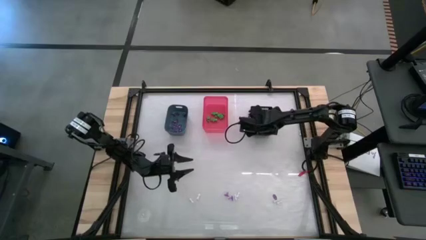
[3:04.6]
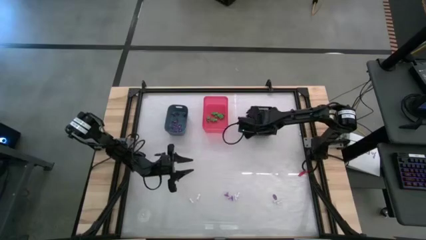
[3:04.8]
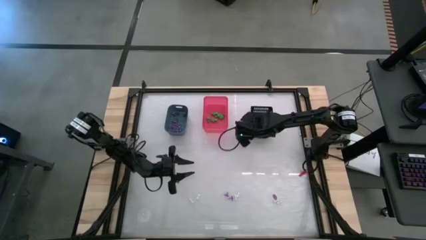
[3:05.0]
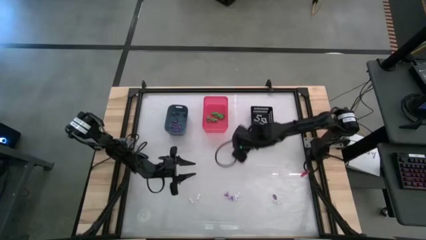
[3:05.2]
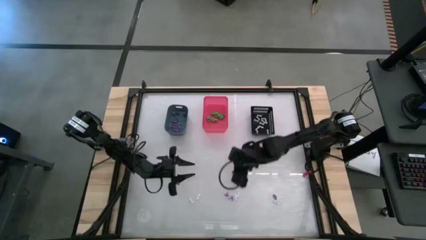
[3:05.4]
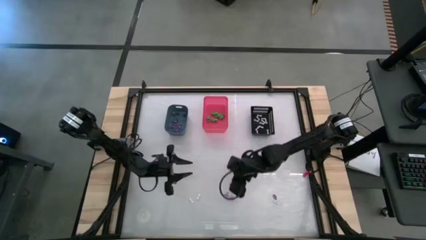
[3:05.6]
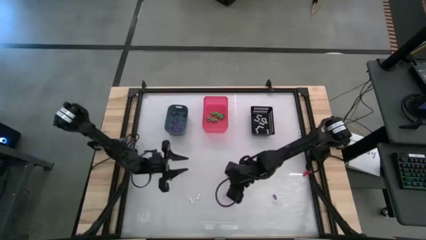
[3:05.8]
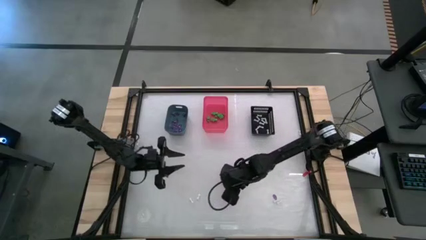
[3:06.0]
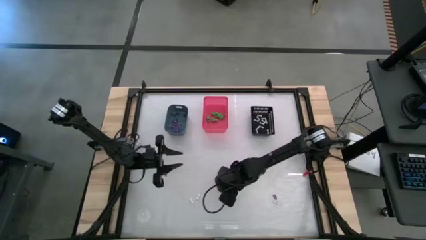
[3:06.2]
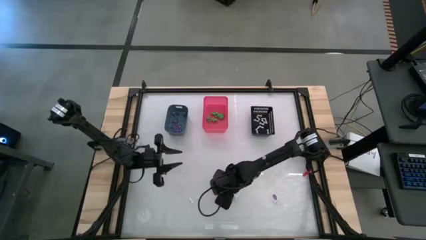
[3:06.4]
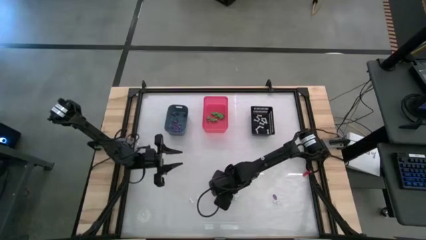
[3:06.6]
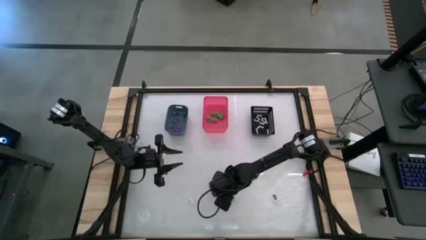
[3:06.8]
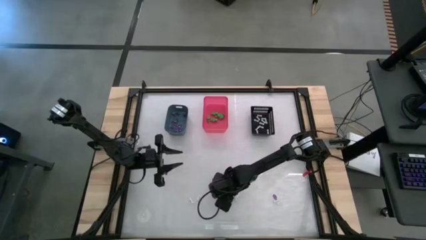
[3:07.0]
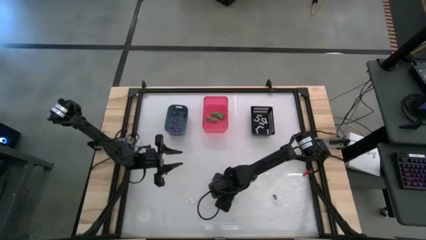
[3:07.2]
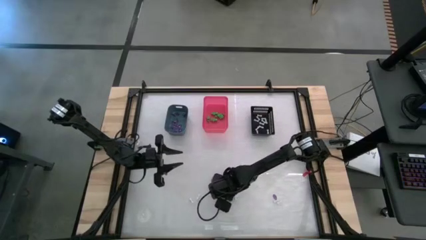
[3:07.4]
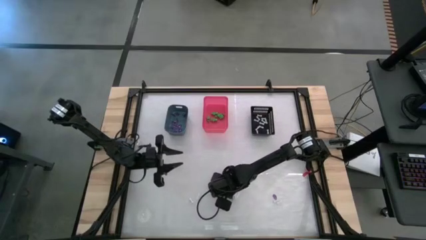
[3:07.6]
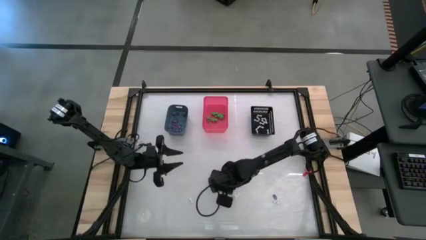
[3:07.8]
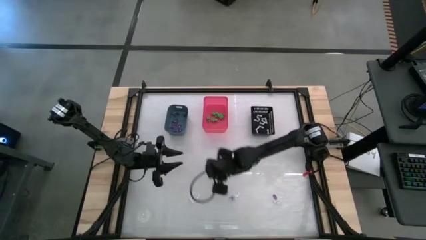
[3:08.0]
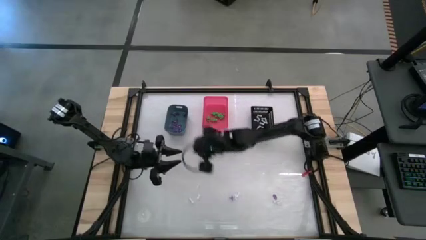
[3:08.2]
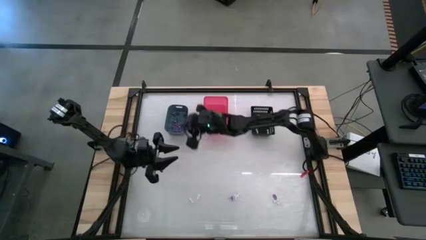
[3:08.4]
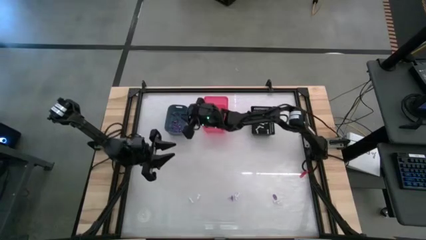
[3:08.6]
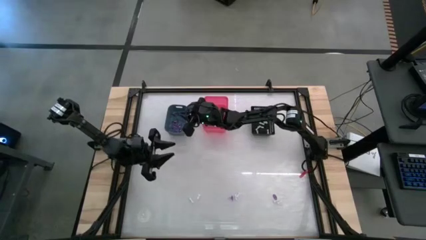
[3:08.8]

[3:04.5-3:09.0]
Task: Sort Halloween decoration
Put the purple witch hat toy into the blue bin

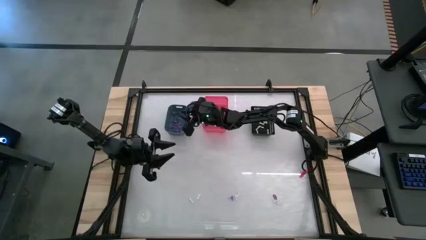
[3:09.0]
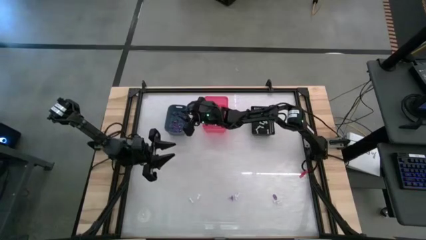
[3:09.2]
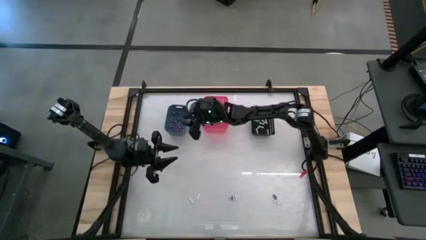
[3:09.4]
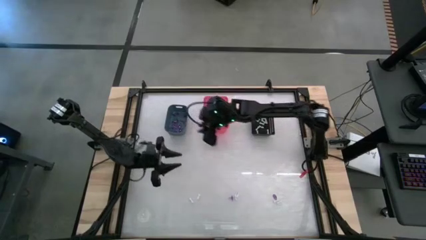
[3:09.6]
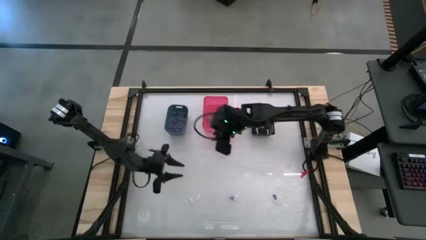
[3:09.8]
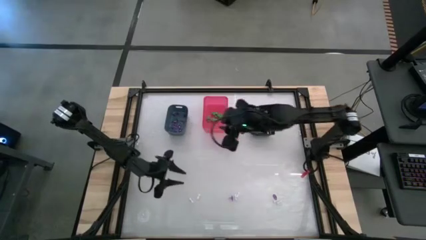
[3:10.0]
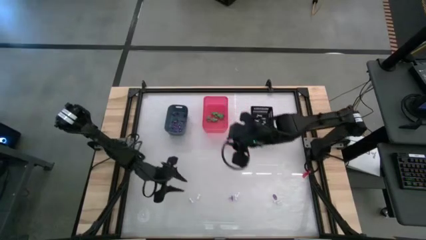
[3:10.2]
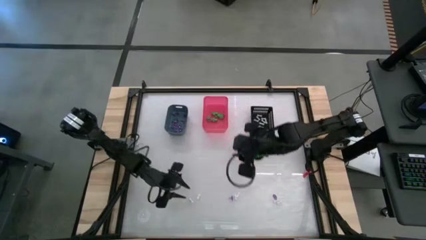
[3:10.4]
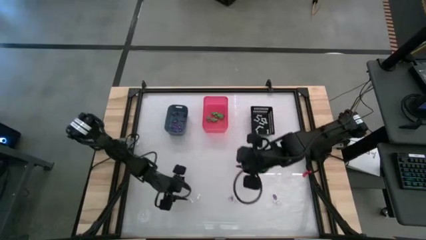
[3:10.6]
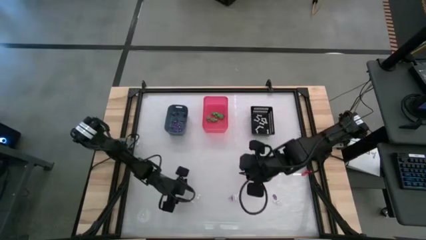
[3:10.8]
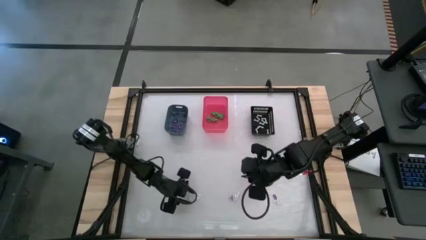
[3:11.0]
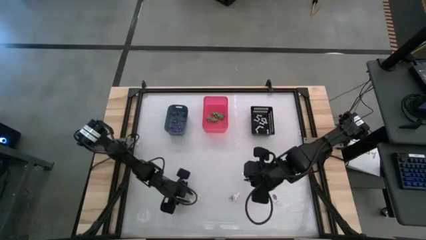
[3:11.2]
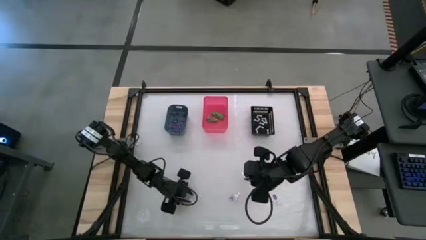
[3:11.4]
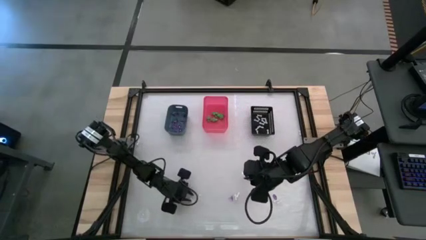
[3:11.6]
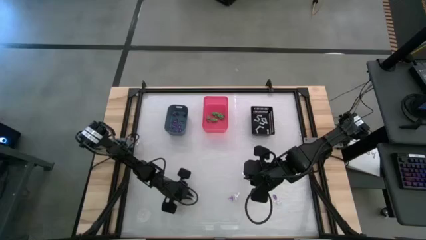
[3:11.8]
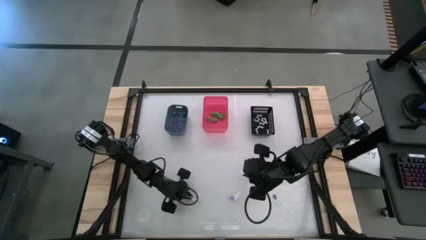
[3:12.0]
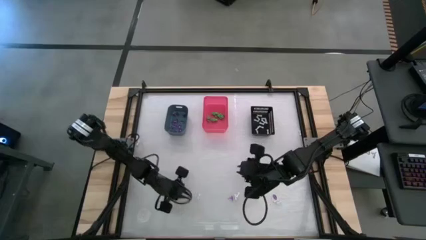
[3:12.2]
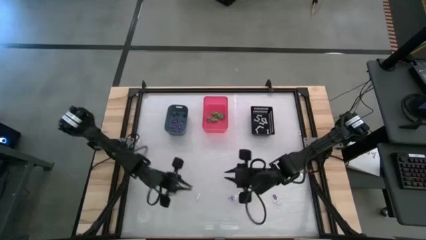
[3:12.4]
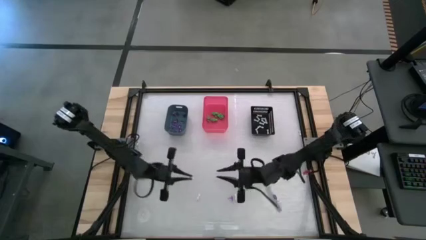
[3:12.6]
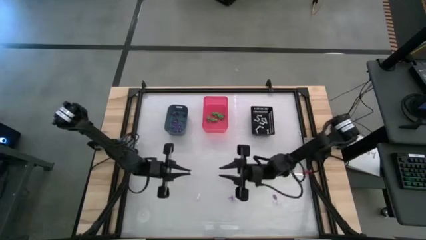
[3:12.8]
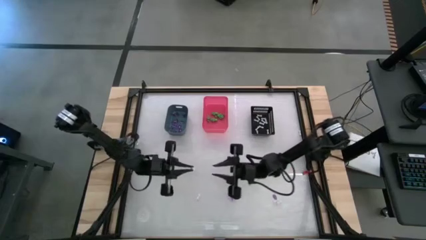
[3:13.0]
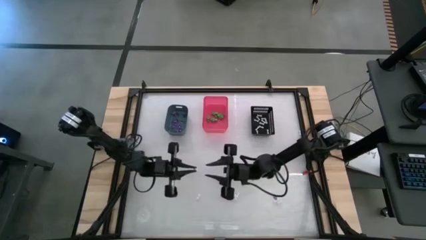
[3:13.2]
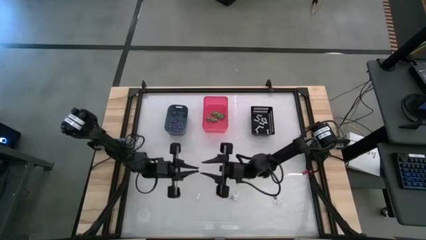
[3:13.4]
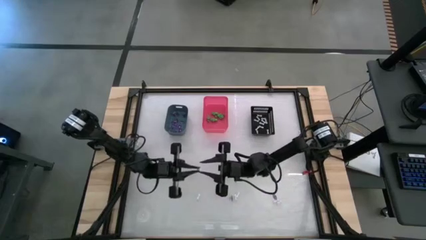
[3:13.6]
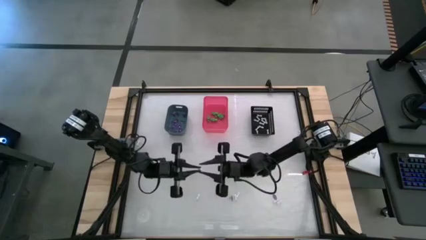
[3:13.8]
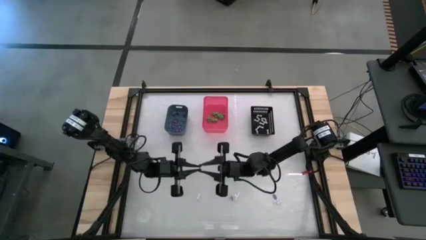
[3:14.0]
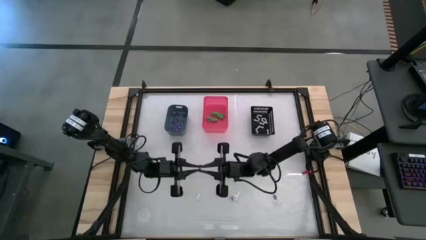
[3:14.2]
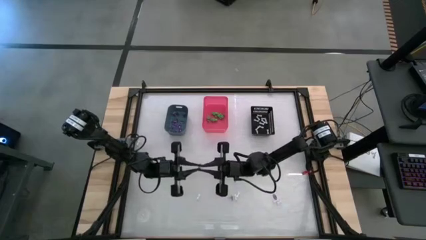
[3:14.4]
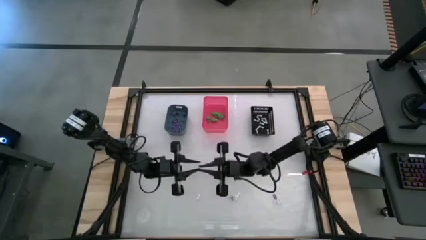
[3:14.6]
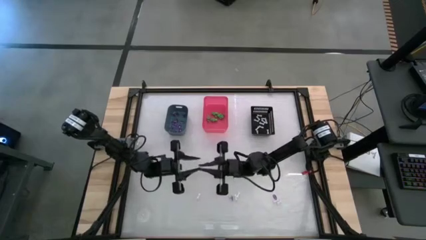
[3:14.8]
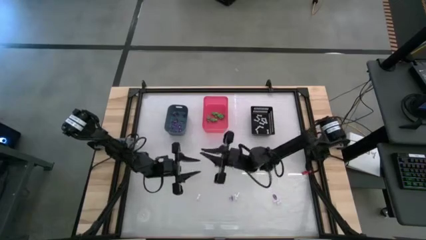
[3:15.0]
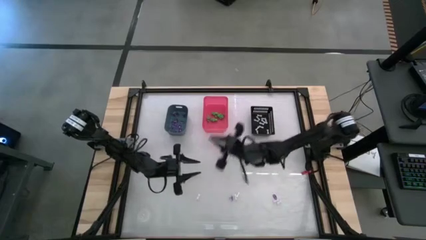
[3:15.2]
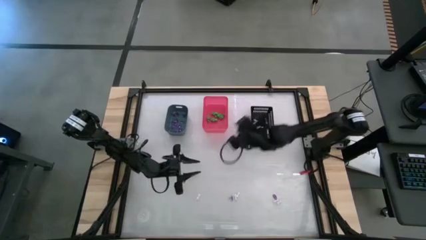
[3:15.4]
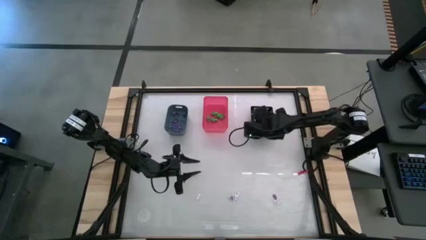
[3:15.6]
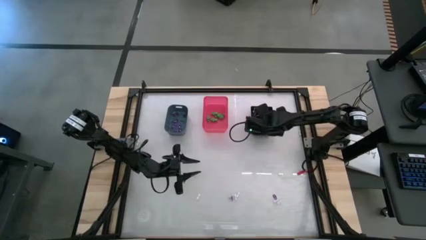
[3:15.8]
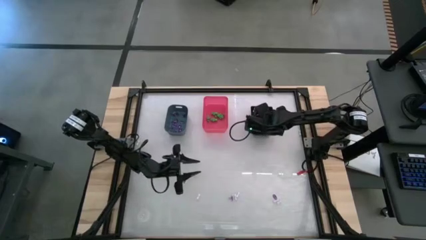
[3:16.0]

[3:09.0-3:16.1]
Put the white bone toy into the black bin

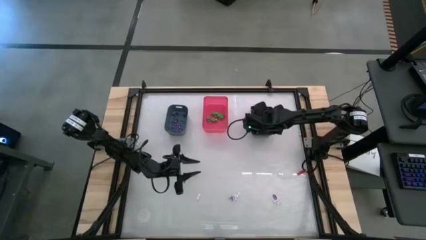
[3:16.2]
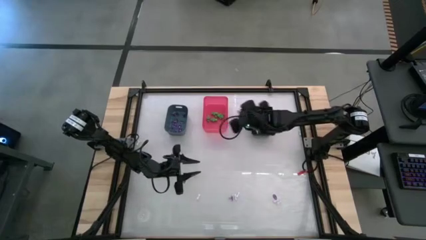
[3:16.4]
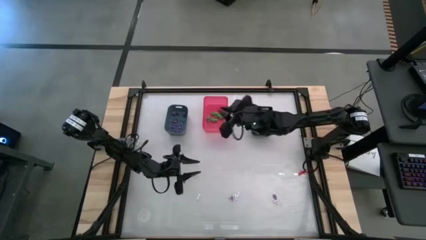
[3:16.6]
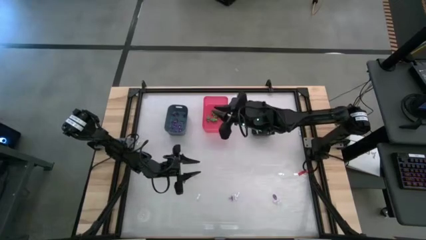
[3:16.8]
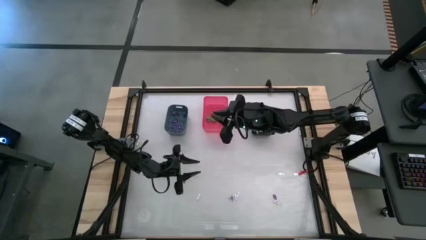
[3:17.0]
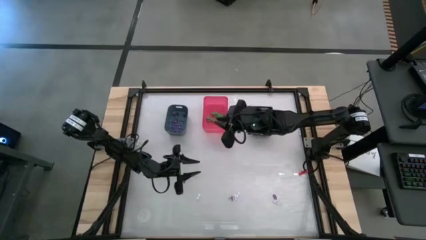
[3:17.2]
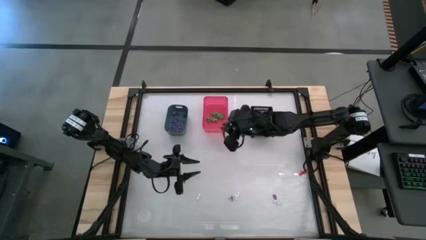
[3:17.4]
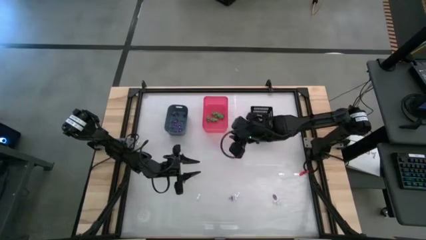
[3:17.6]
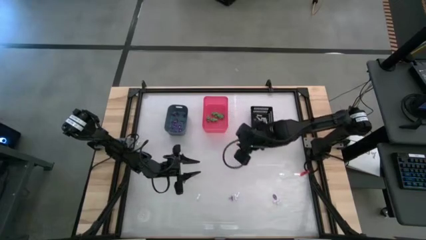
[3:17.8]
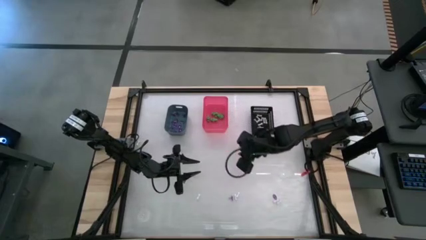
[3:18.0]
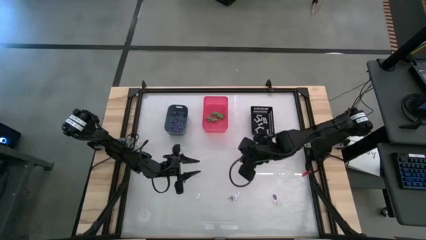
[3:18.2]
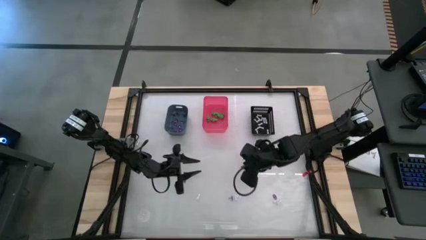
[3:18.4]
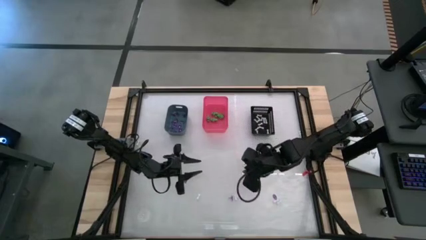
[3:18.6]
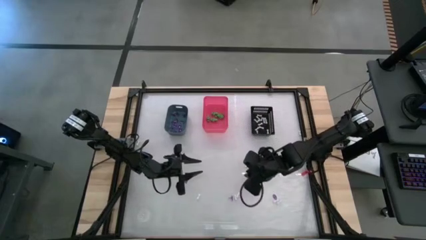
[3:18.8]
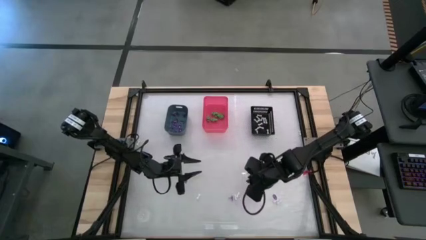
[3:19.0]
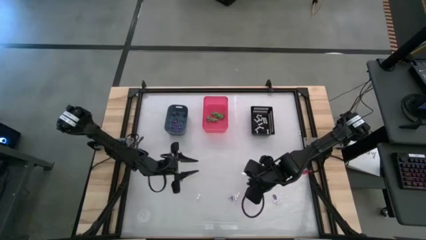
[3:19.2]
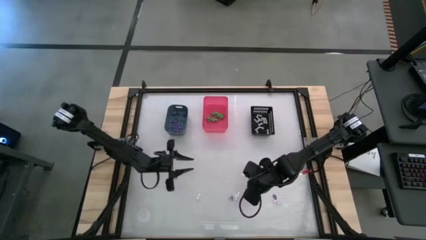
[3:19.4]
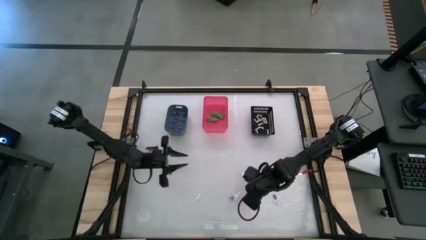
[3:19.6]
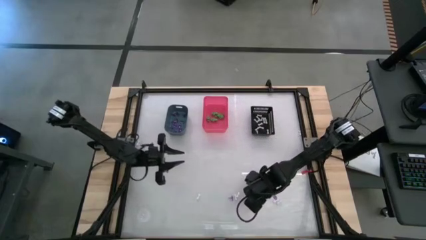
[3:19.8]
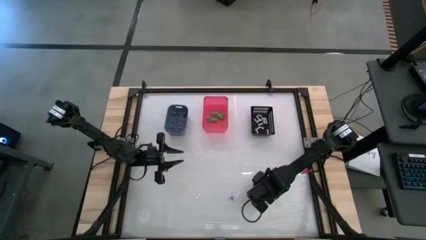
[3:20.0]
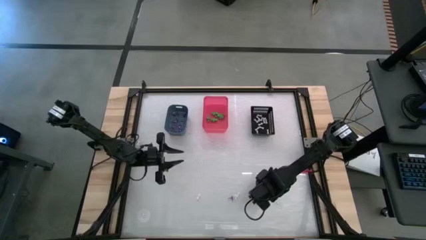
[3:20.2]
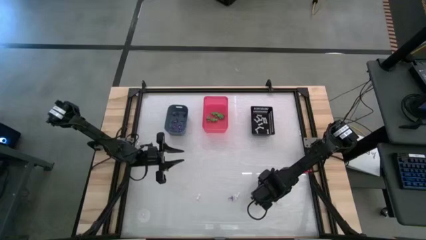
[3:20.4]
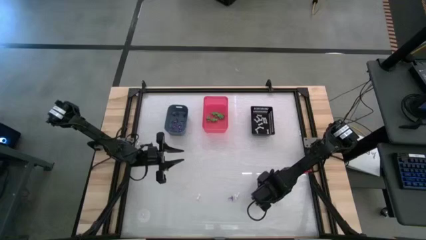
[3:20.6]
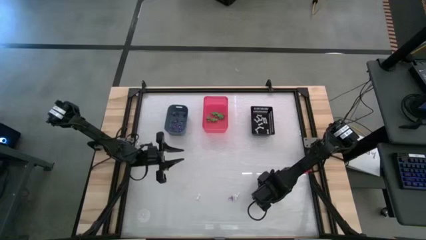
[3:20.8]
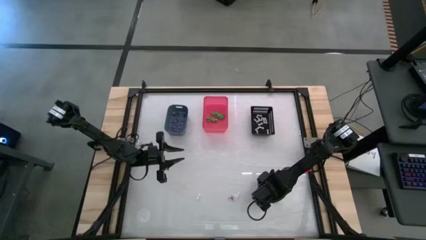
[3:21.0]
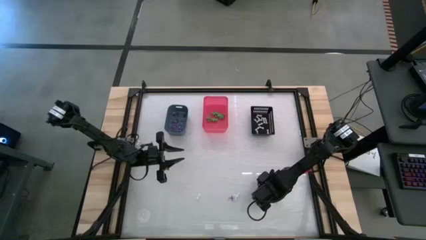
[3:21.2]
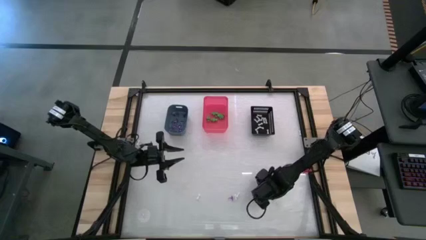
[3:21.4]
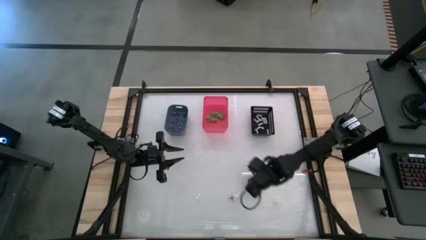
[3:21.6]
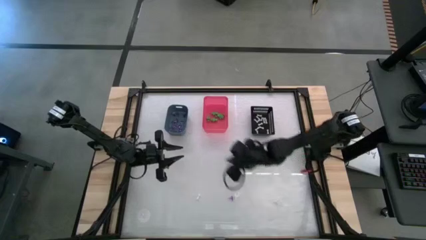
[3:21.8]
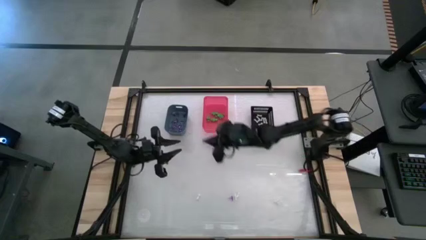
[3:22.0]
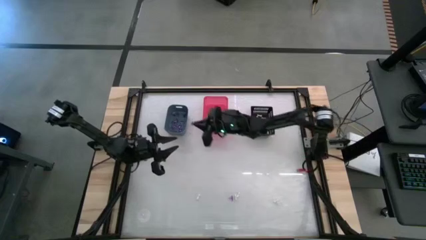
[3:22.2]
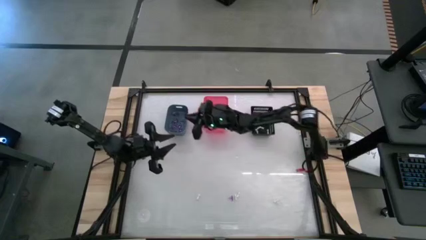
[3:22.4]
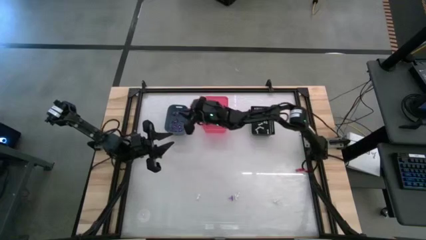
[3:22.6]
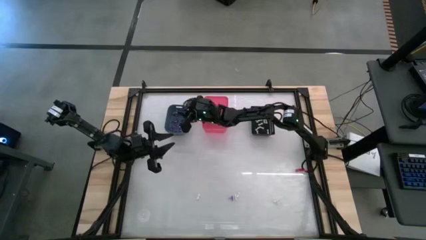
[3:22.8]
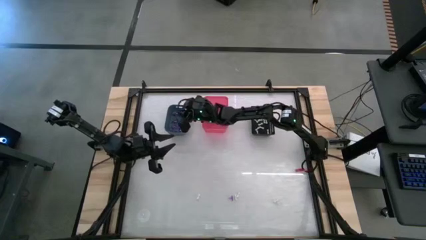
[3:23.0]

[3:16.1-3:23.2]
Put the purple witch hat toy into the blue bin
